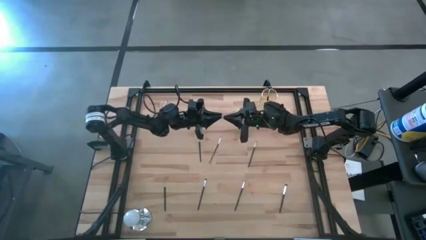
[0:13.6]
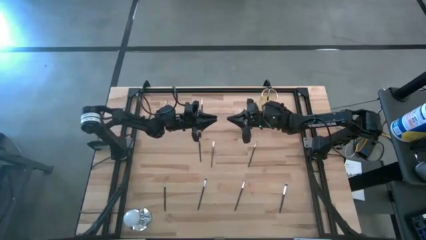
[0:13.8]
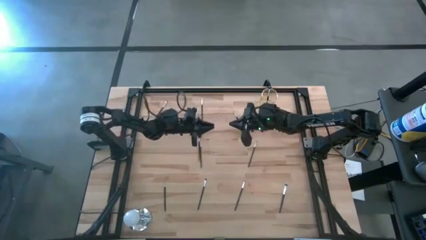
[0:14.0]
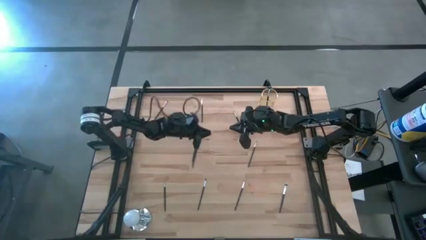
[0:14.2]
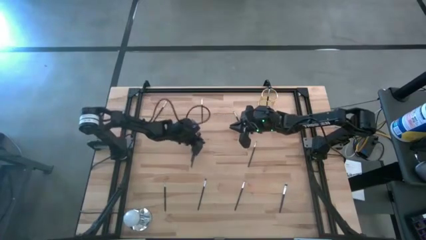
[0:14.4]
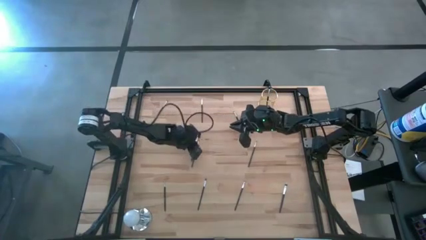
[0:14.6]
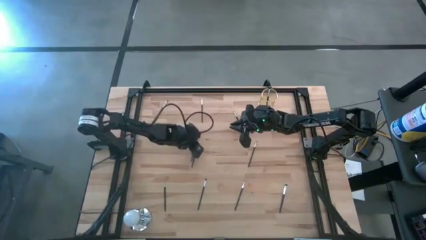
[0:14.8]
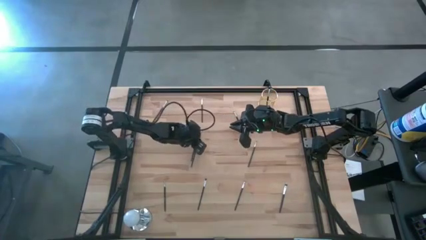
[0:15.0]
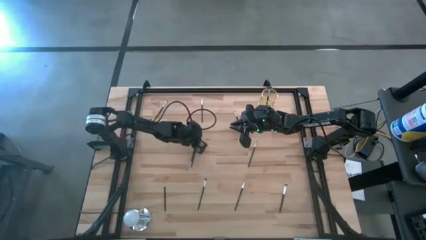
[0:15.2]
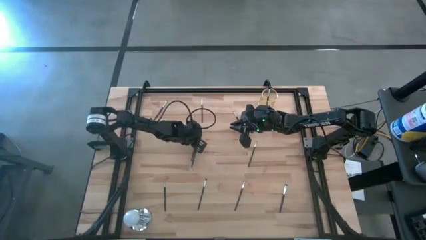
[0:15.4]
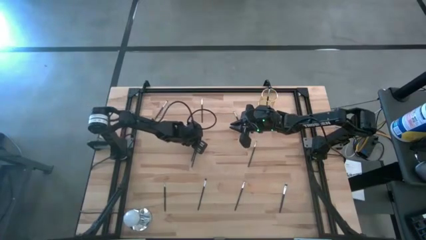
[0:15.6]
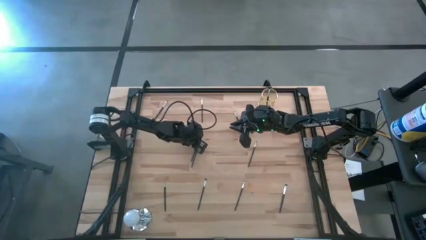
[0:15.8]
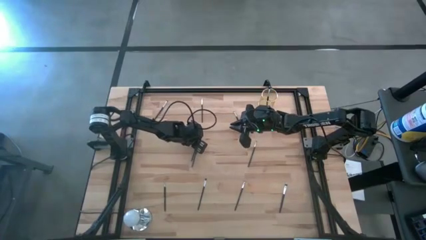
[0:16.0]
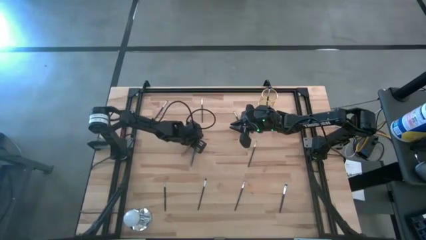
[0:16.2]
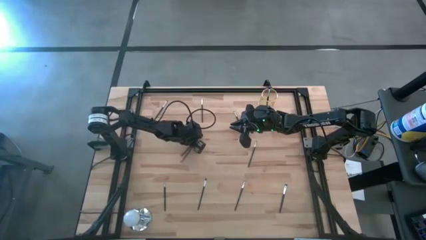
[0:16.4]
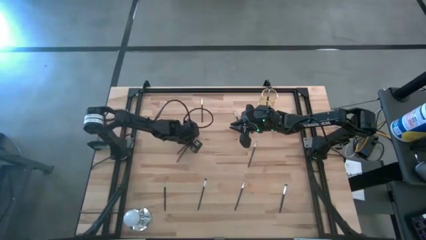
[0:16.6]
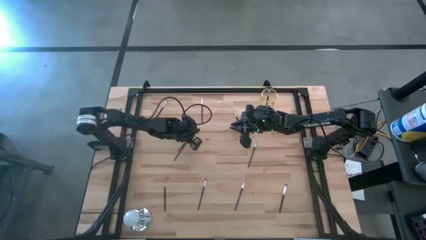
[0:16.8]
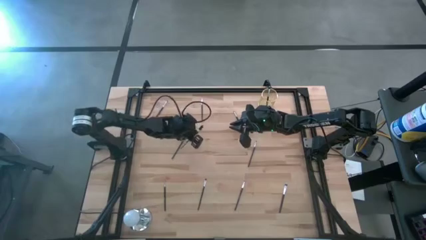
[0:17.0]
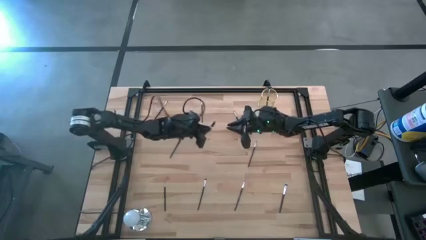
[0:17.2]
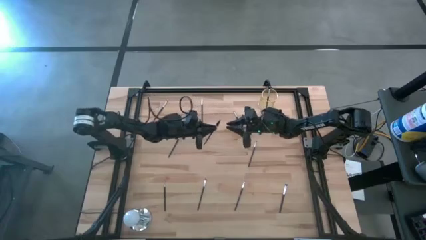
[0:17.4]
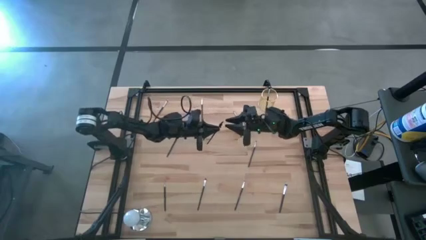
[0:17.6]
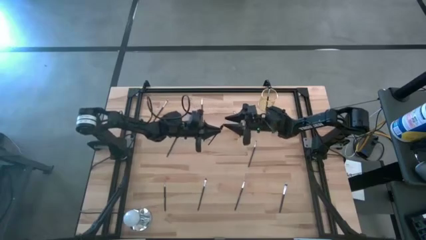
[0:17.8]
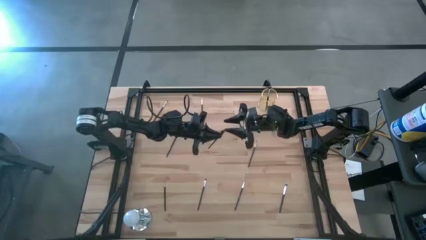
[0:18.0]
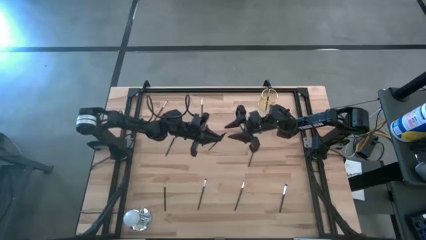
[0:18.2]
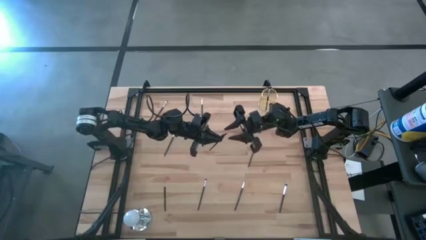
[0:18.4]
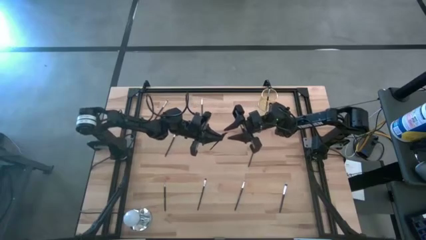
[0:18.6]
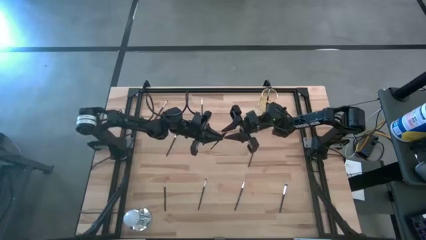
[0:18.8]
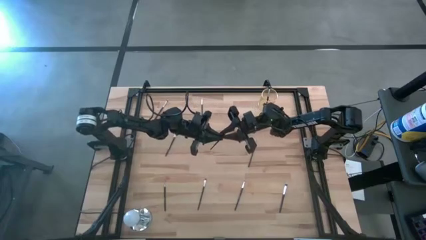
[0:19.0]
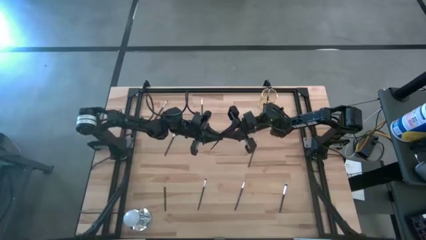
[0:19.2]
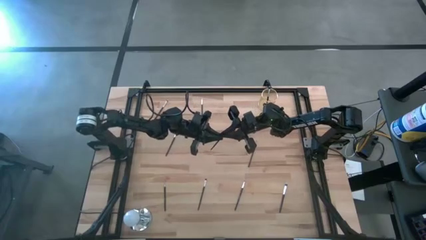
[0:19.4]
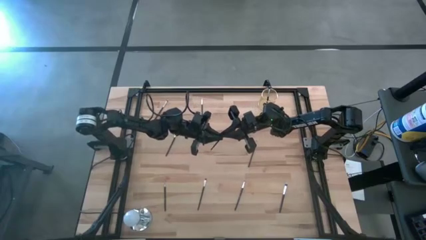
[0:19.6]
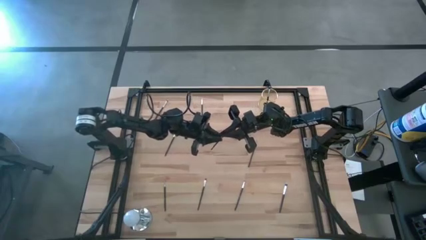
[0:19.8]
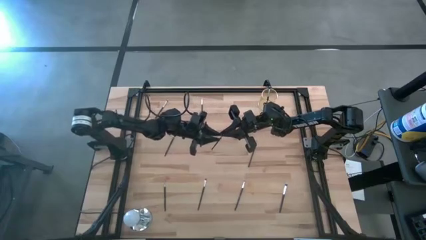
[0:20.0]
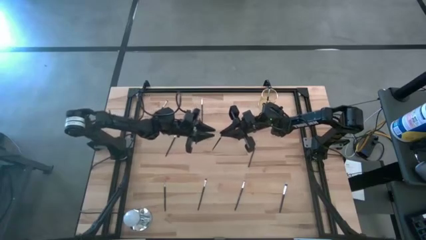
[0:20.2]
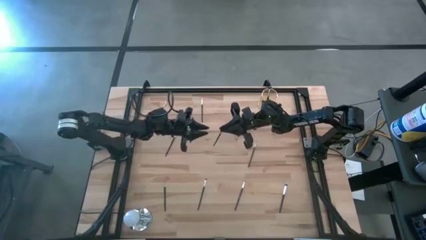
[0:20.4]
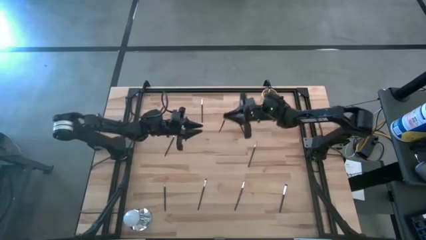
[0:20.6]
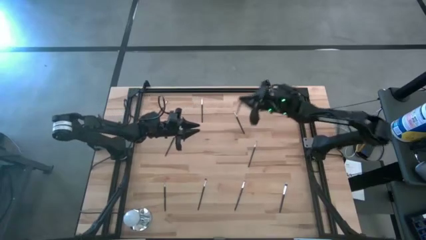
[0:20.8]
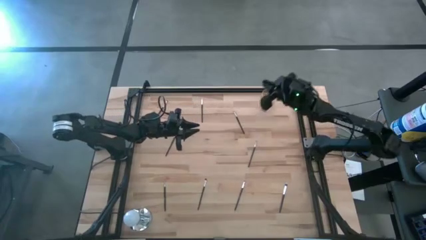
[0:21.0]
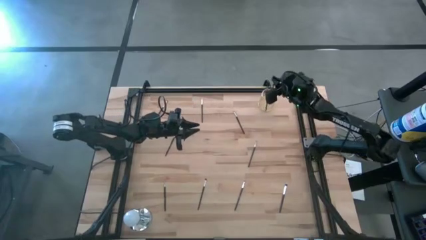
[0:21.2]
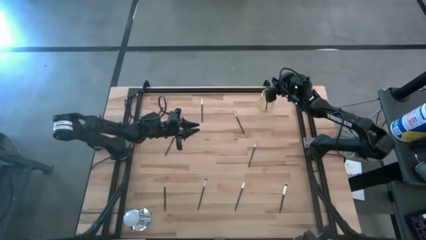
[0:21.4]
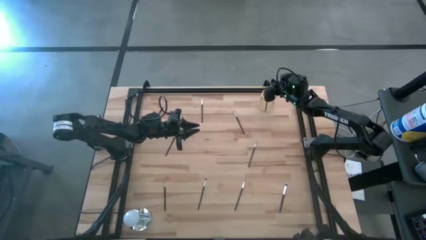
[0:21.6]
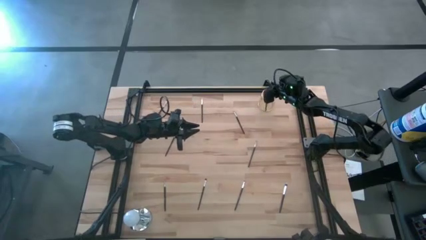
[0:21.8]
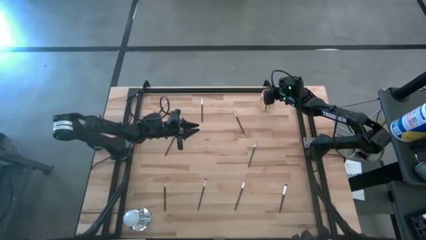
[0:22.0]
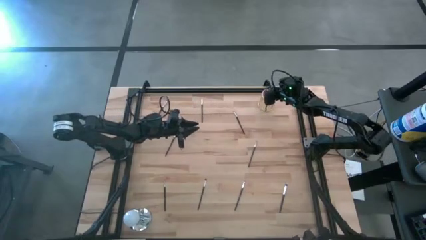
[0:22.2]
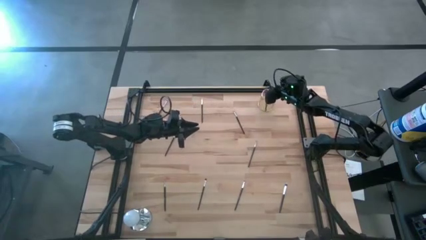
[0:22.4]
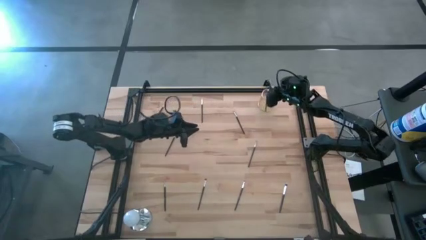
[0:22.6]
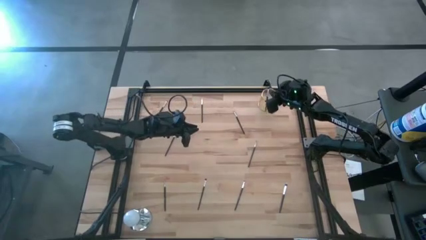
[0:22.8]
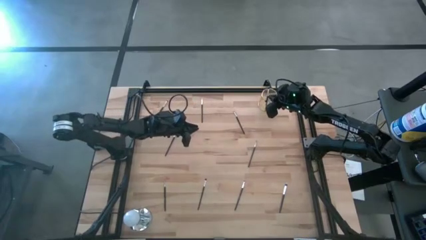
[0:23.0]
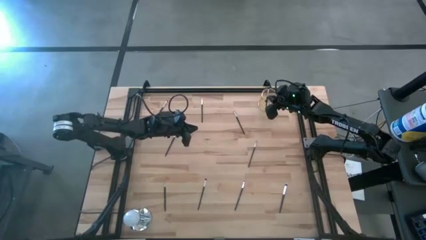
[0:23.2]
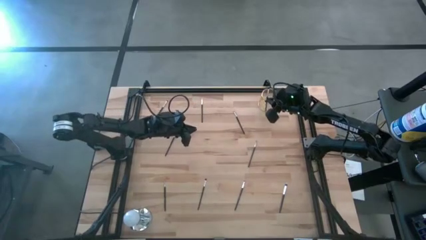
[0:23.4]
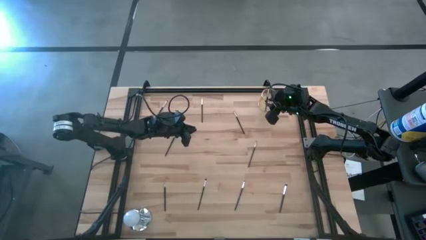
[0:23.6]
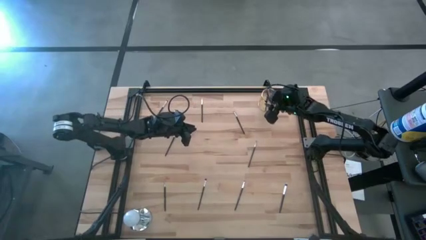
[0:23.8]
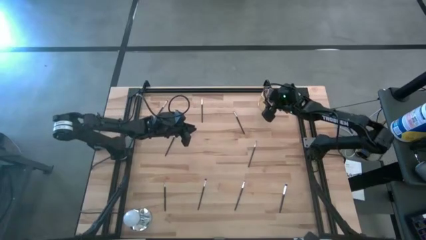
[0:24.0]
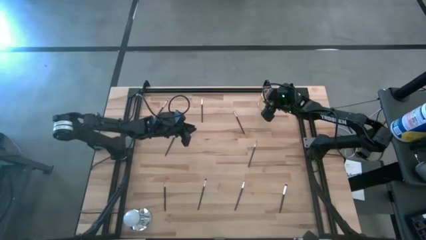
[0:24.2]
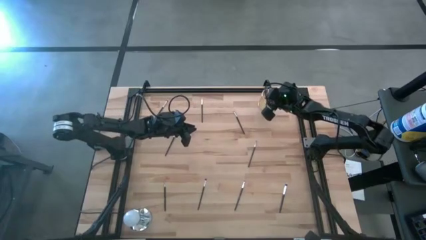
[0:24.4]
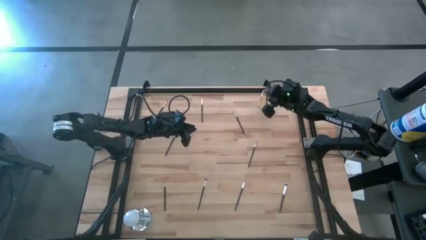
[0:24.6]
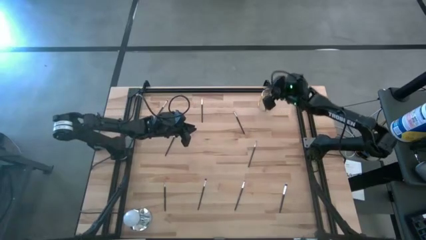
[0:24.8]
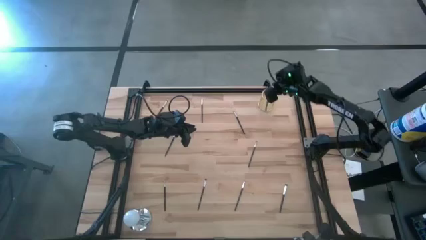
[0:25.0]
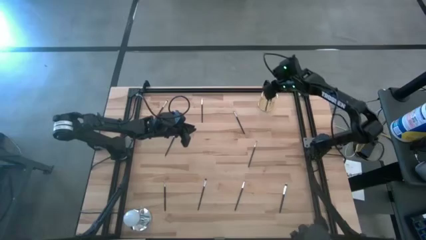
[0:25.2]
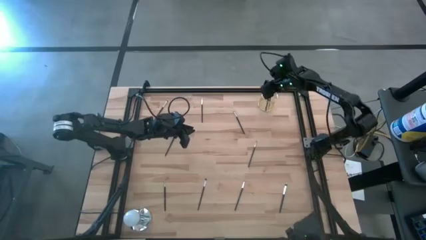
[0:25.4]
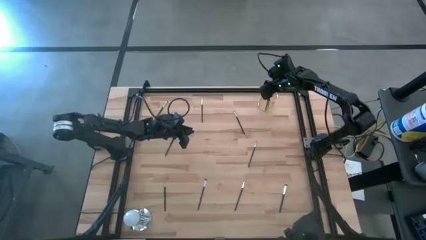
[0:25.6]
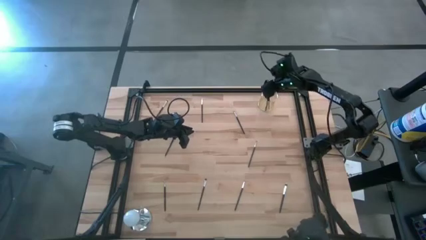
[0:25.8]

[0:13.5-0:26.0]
Task: Put items in baskets/containers
Put the black eyebrow brush into the gold pen holder

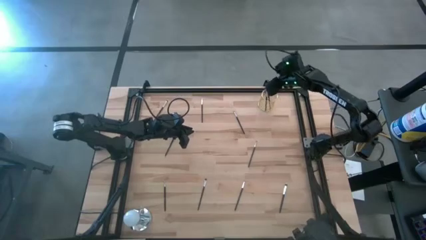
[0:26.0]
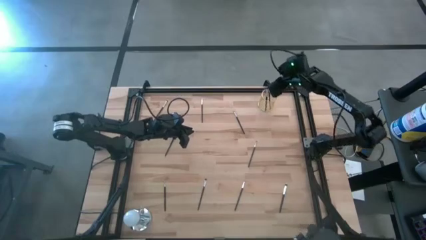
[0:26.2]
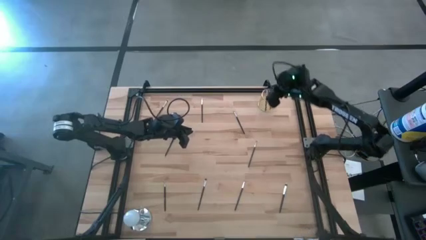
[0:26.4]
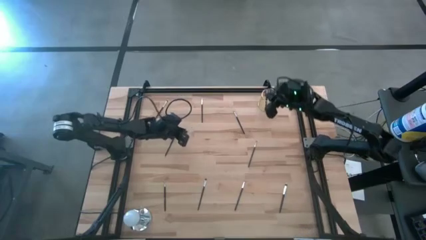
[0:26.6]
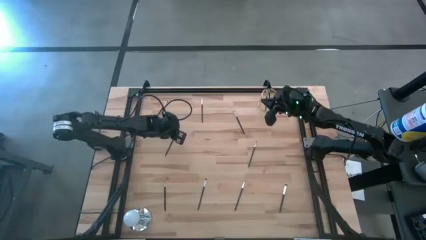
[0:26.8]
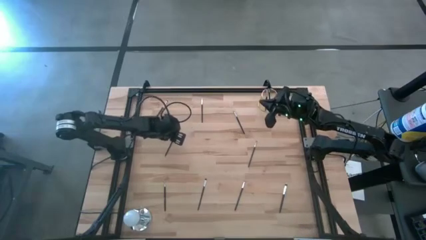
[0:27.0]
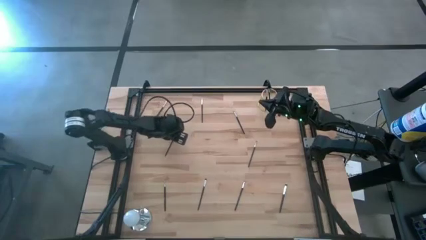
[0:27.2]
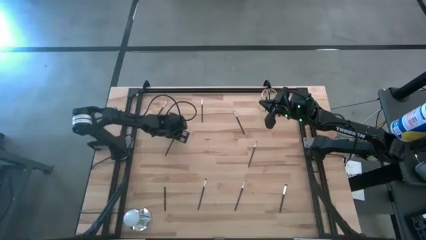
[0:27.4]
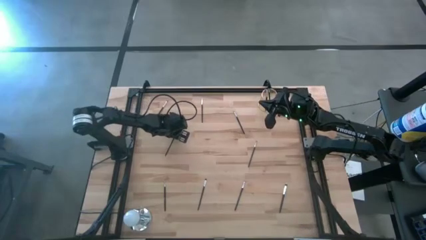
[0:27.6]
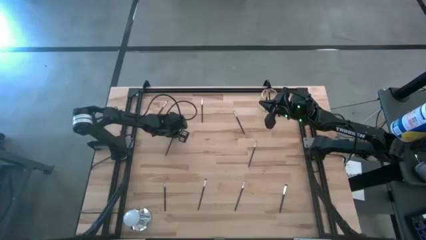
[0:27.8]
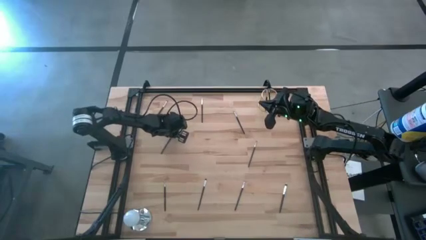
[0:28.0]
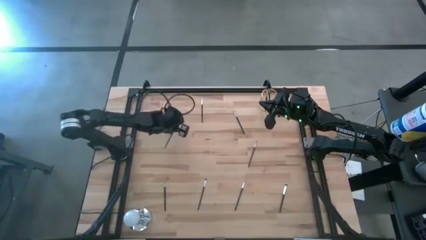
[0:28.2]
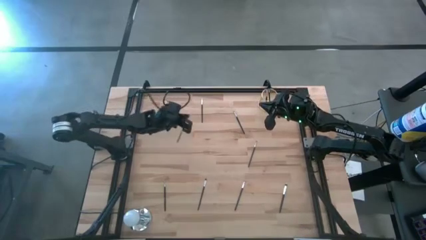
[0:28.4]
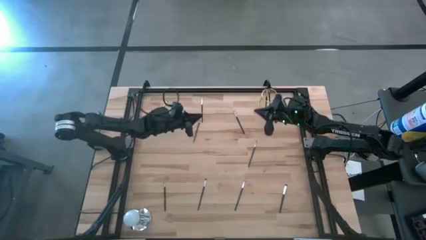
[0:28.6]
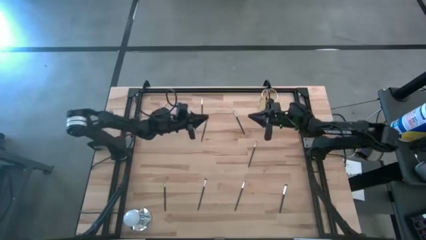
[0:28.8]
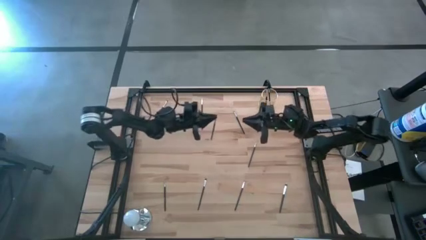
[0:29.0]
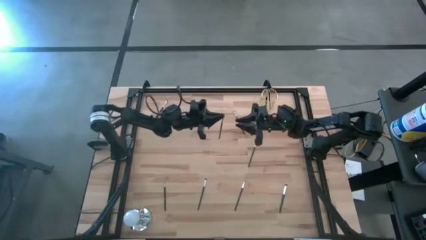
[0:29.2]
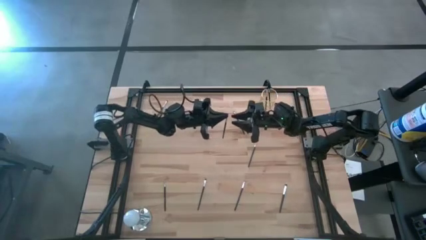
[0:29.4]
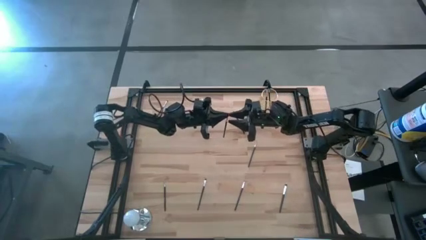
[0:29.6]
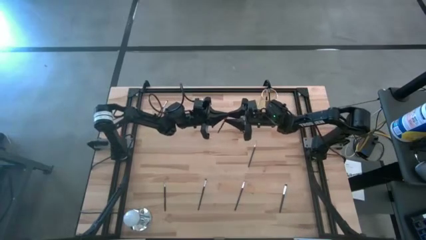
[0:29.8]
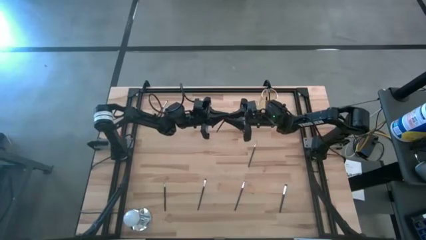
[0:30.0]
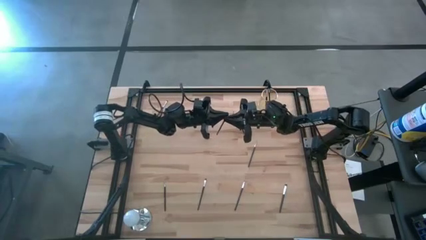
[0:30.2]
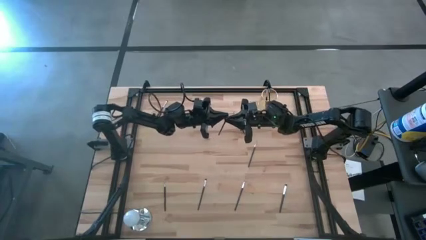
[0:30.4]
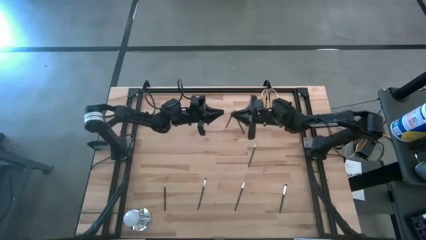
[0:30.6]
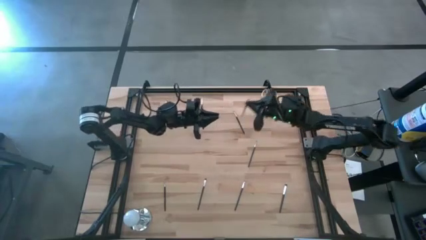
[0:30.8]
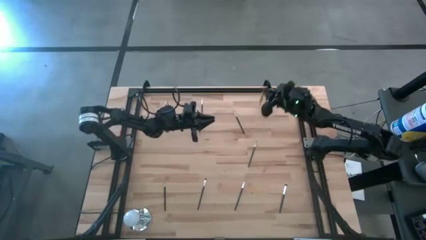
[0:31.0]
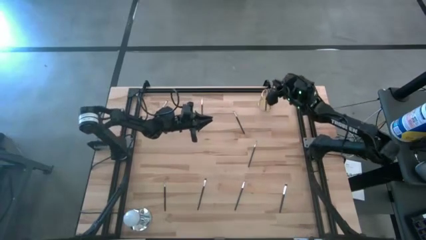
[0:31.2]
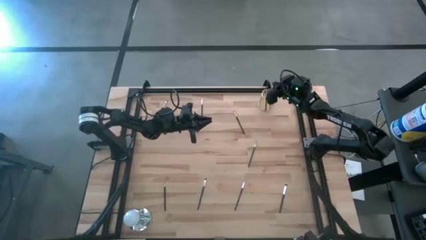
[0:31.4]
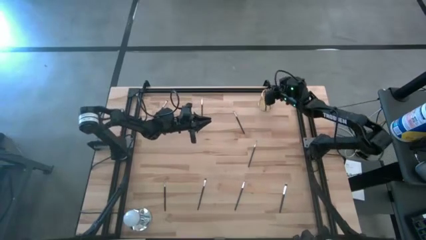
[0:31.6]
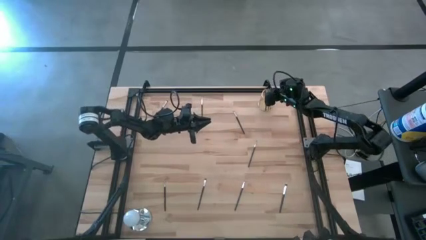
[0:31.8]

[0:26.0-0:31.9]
Put the black eyeshadow brush into the gold pen holder
